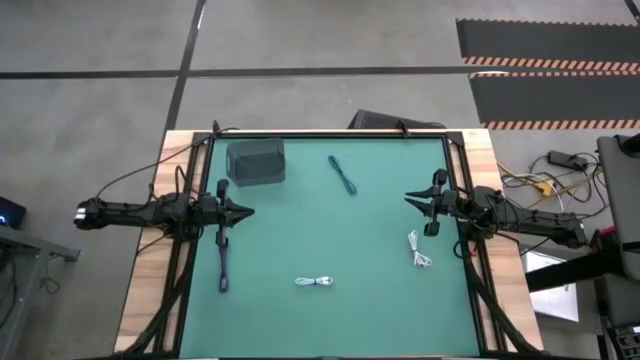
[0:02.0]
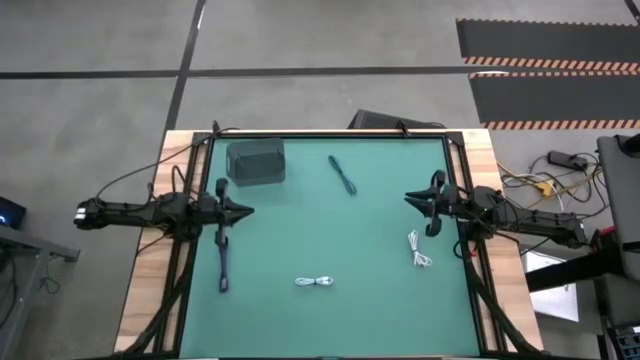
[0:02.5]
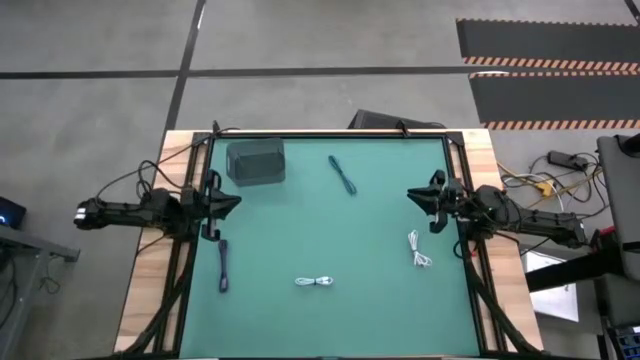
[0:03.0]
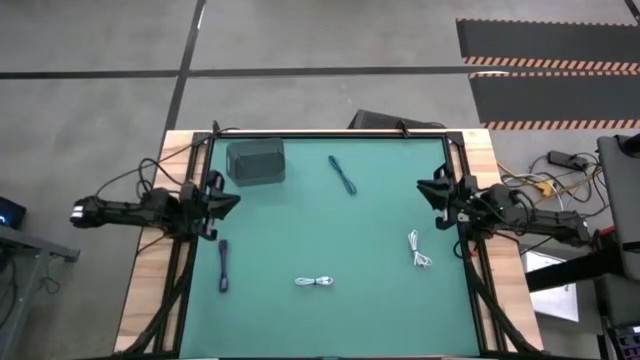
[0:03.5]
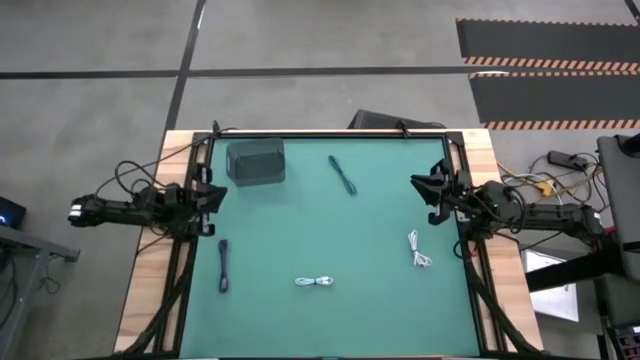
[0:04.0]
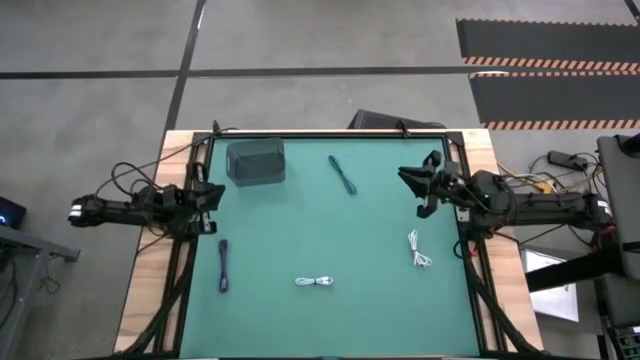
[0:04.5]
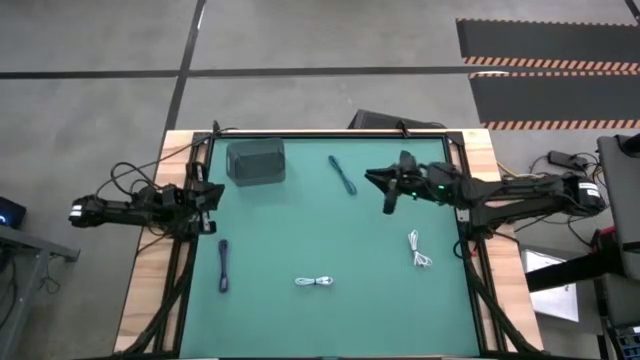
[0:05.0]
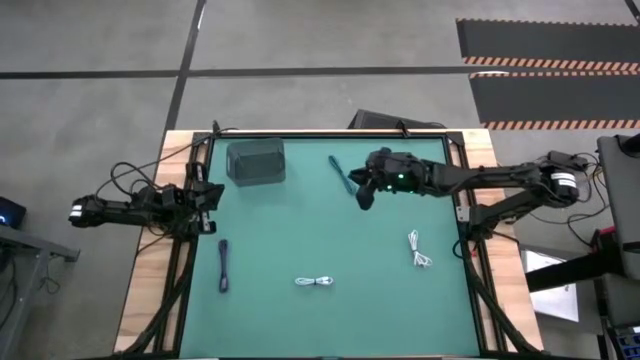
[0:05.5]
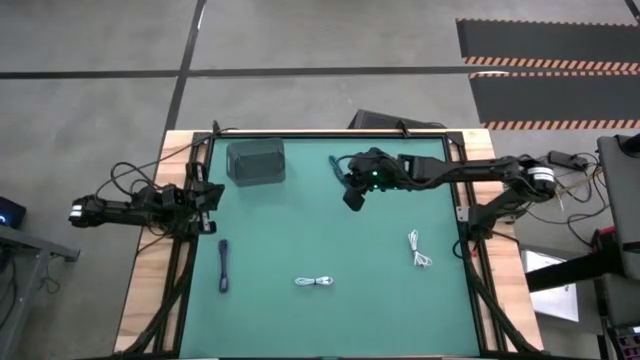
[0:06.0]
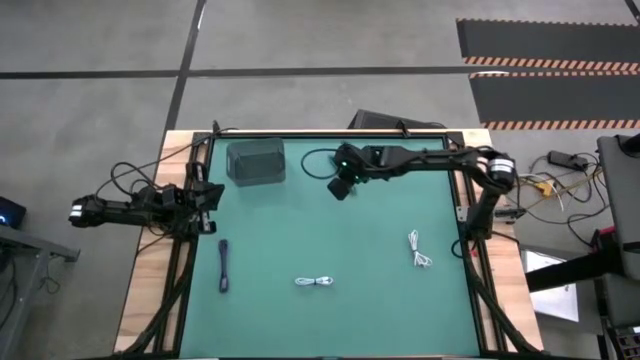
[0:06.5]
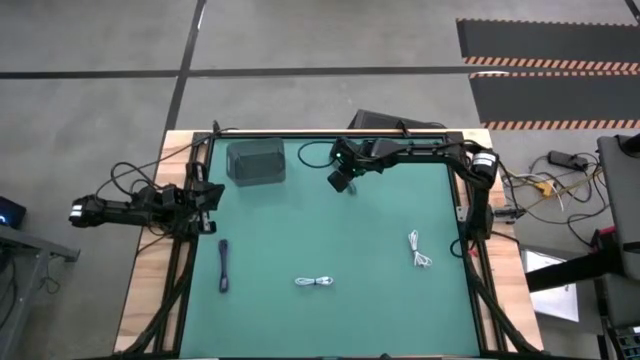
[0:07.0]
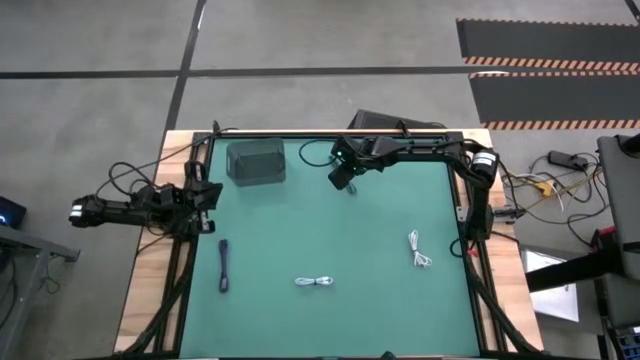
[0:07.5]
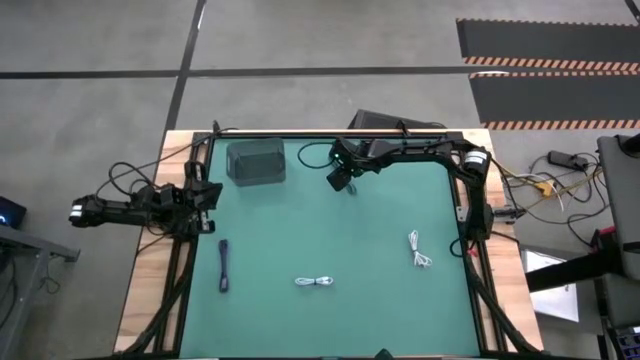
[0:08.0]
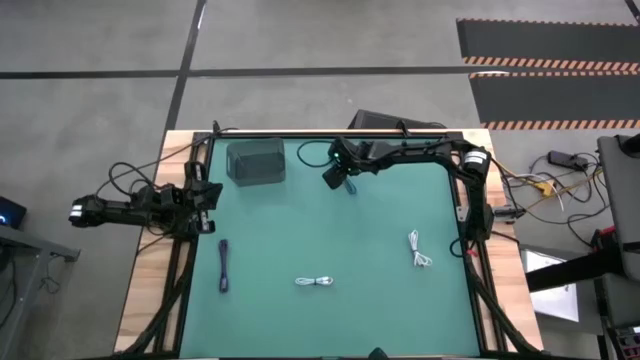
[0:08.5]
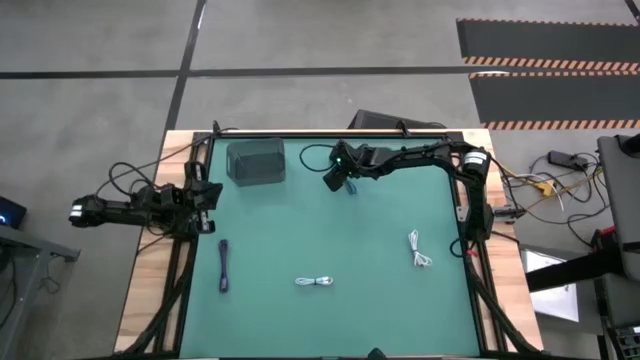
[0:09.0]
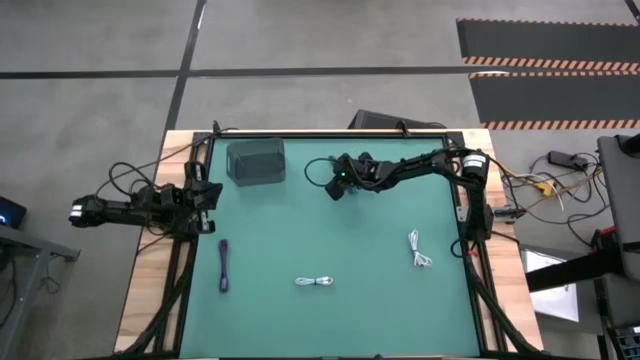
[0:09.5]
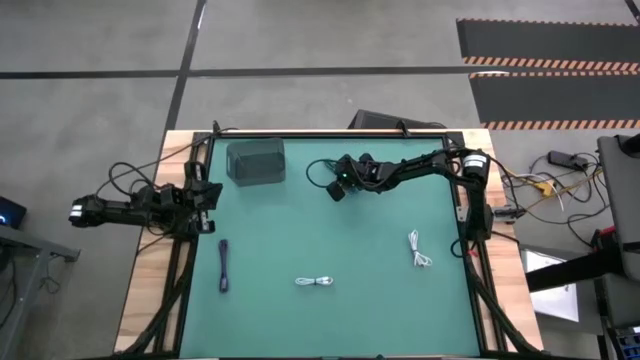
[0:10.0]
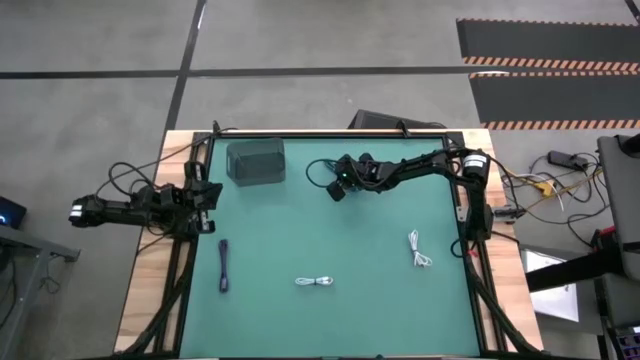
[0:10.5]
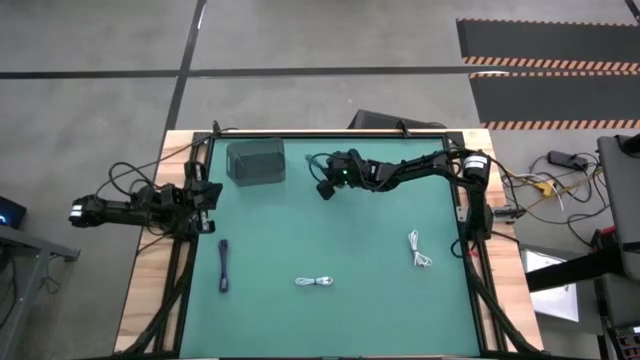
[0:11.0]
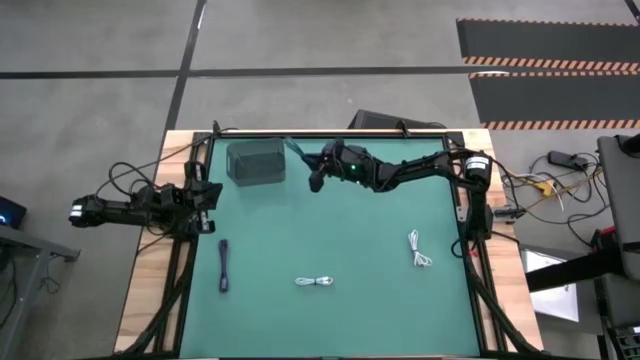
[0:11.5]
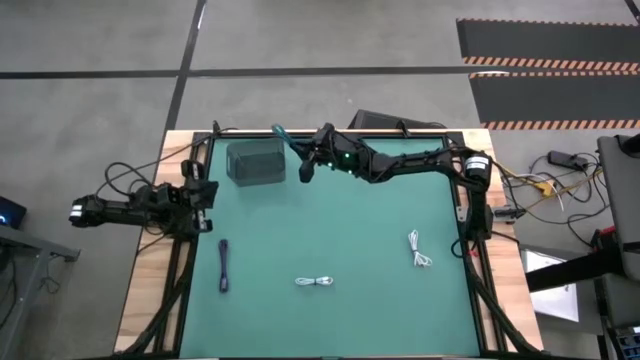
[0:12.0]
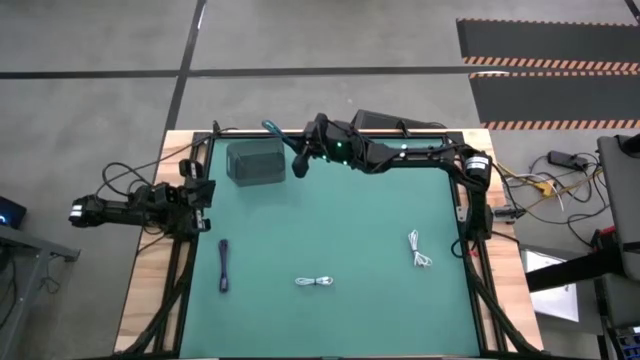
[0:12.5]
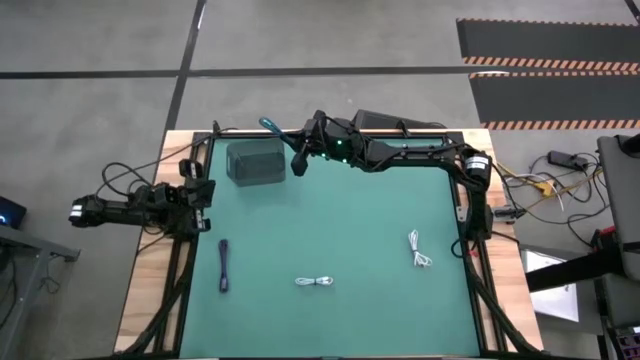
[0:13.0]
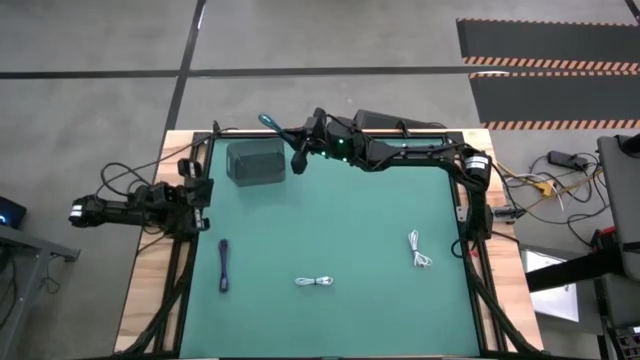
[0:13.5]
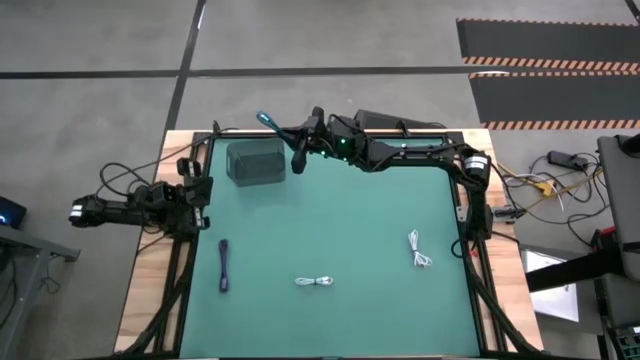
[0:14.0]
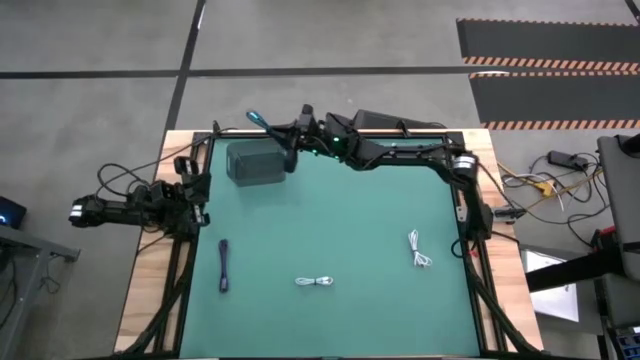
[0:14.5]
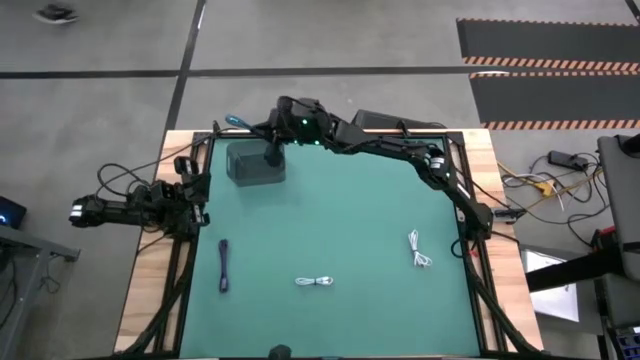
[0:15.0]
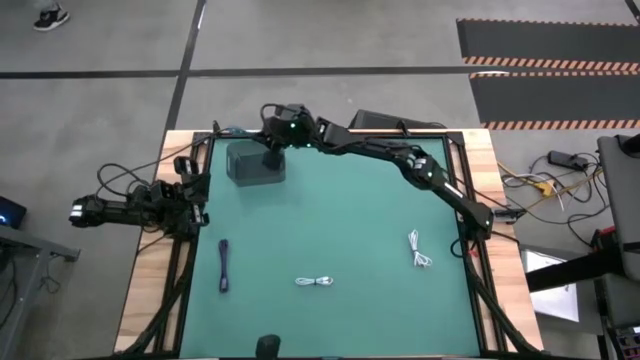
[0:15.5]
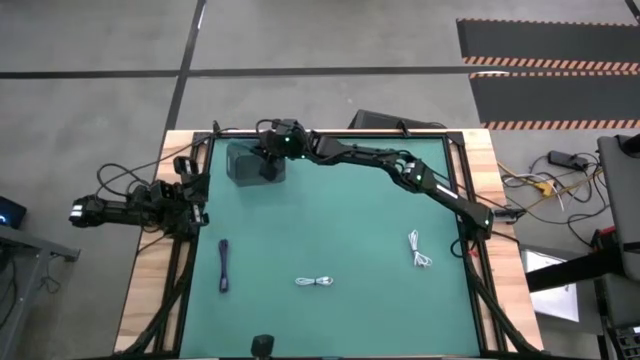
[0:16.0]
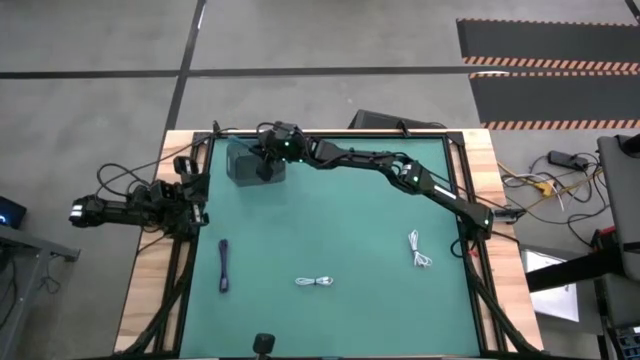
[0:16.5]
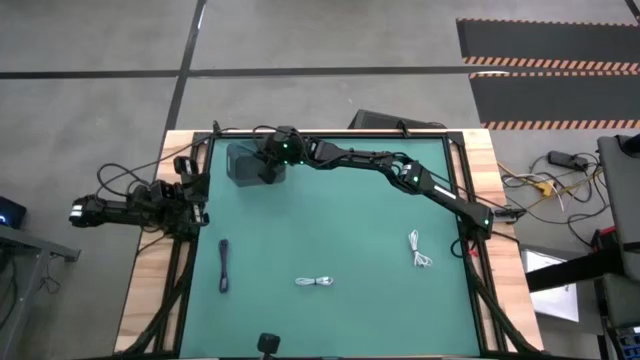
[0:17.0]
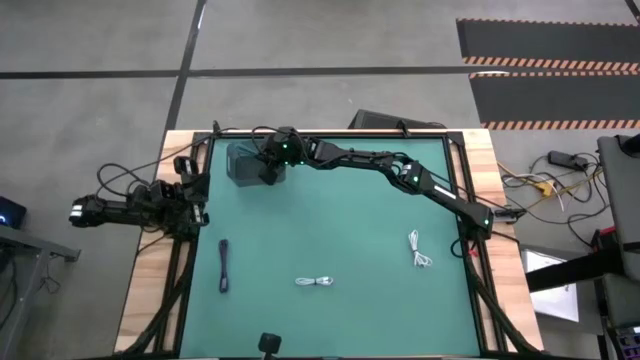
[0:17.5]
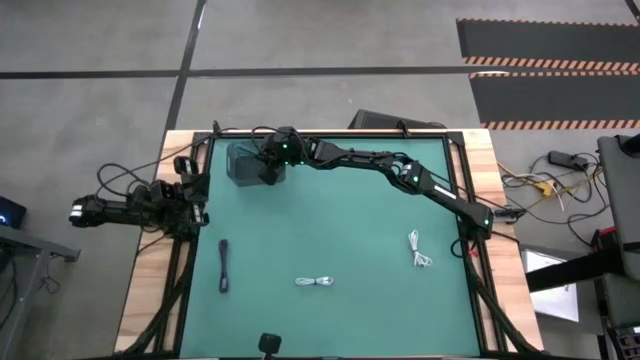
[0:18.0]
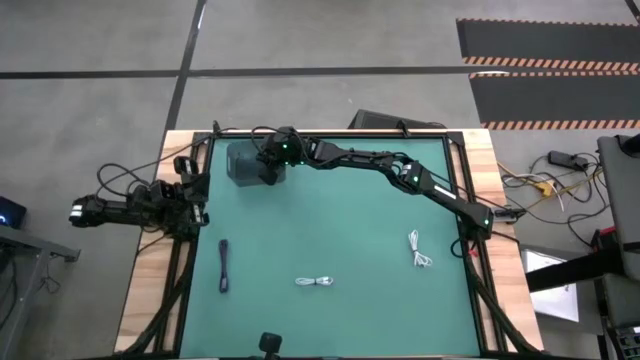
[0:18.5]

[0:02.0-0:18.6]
Task: Pick and place USB-C Cables
Put the blue charger cable into the black bin

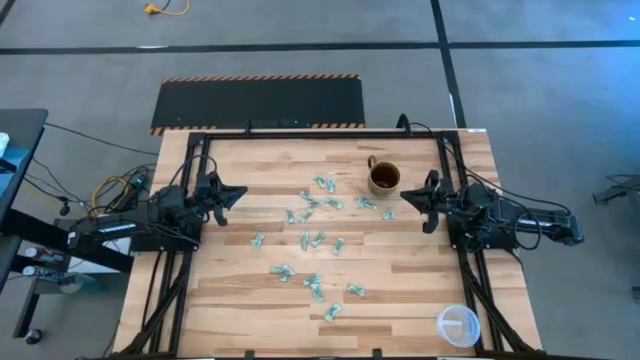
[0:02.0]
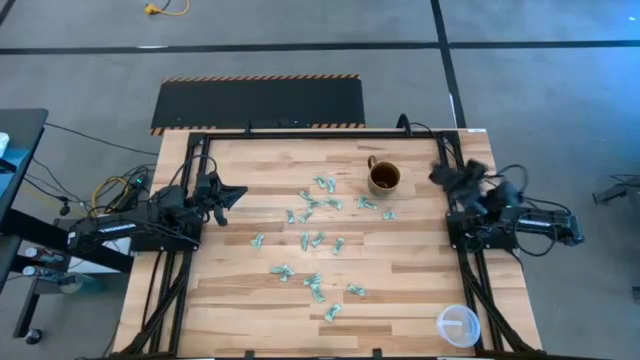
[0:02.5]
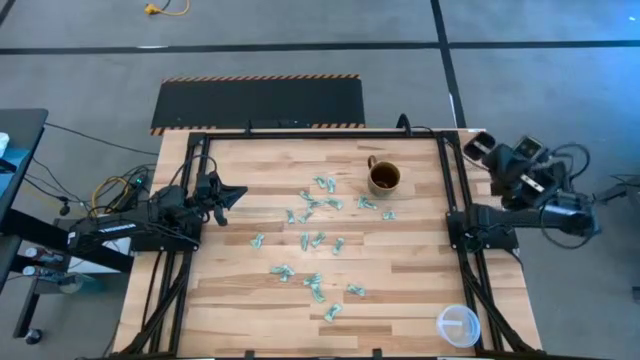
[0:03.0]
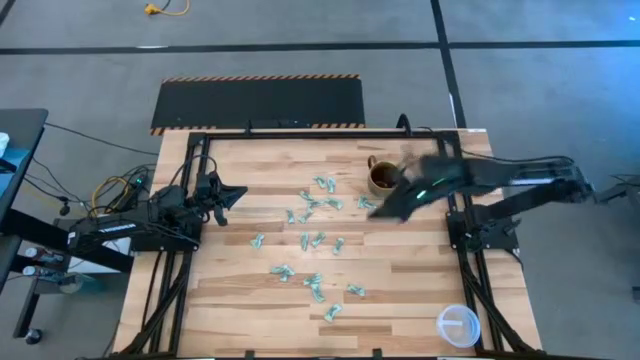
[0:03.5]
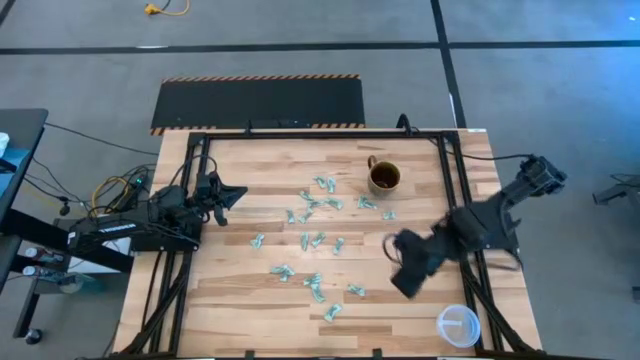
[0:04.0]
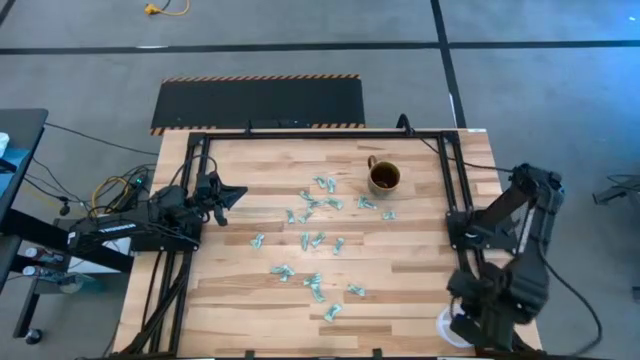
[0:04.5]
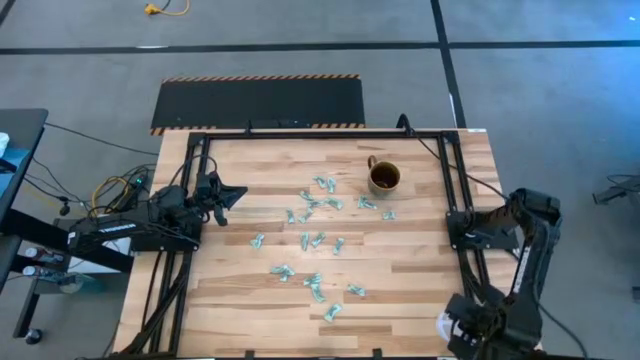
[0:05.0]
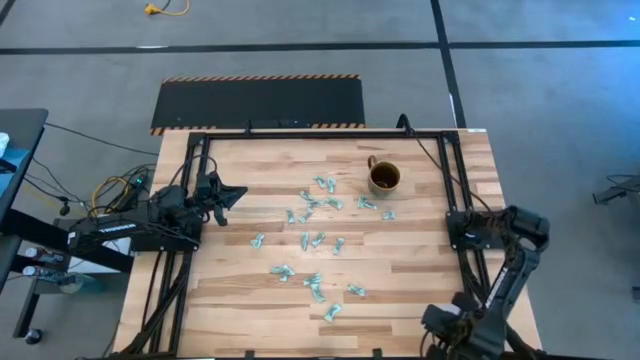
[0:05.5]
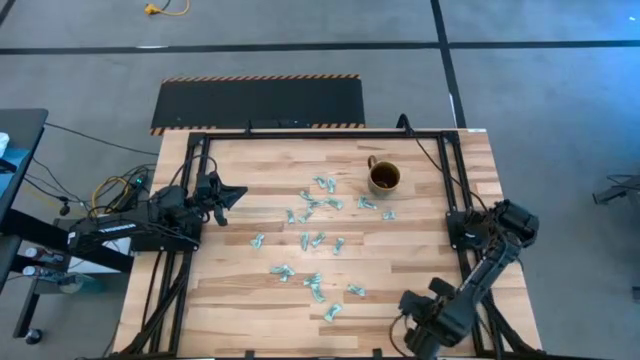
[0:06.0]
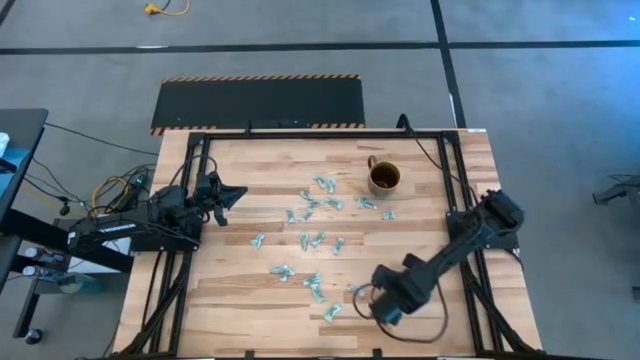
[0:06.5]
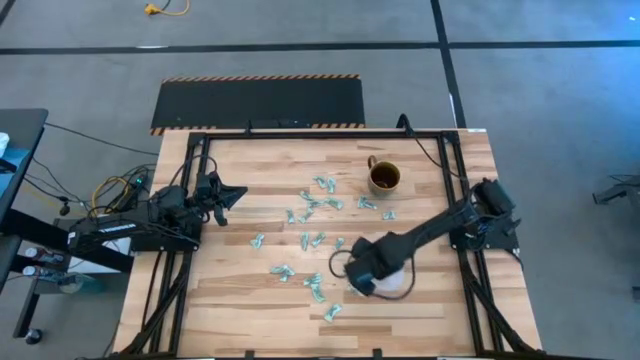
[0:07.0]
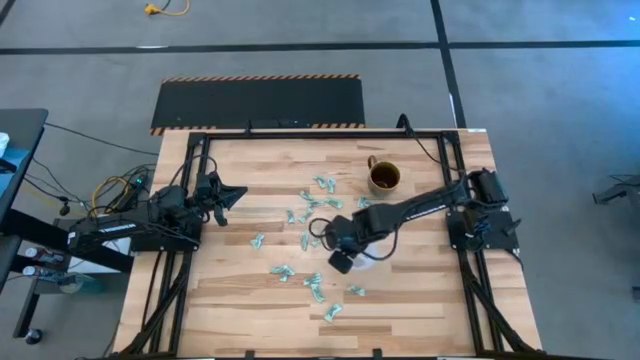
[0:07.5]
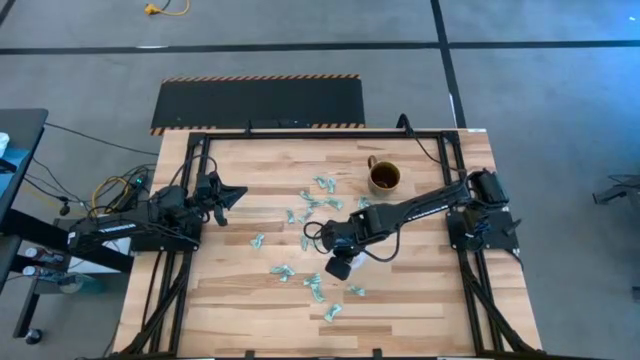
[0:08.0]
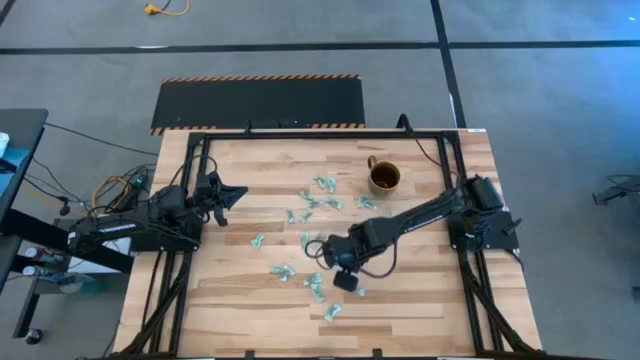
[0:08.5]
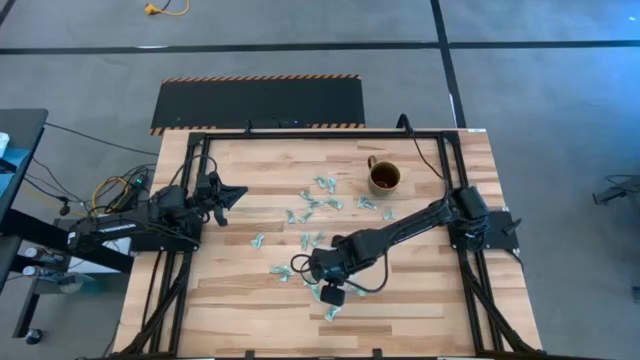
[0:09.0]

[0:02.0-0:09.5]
Task: Pick and place Stevia / Truvia into bins
Move the transparent container to the center of the table
